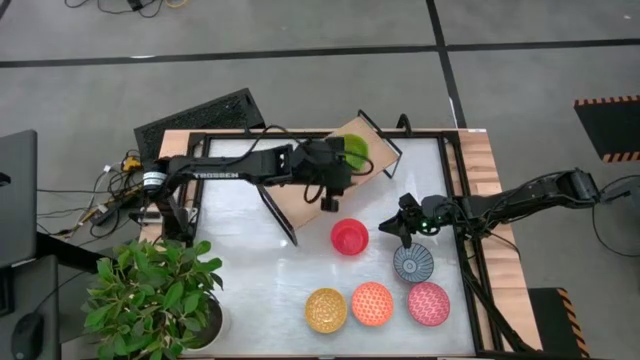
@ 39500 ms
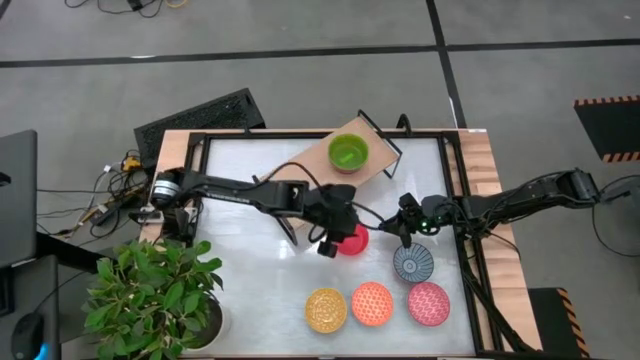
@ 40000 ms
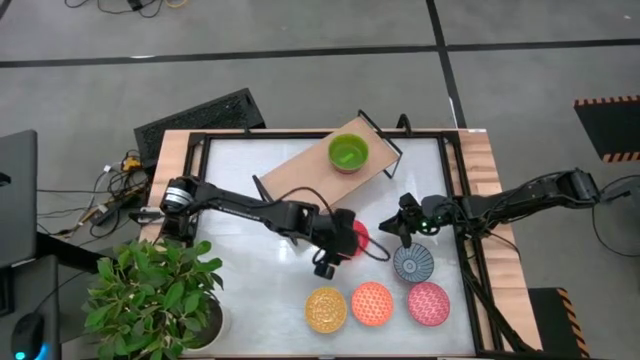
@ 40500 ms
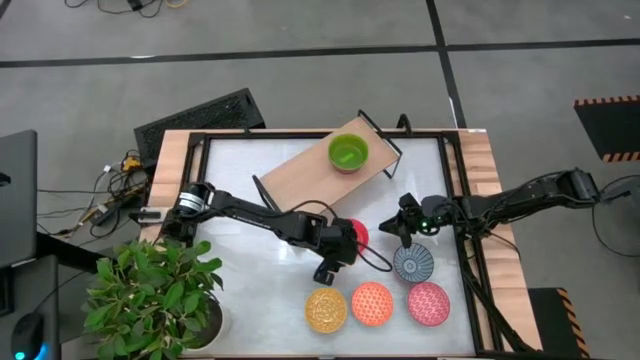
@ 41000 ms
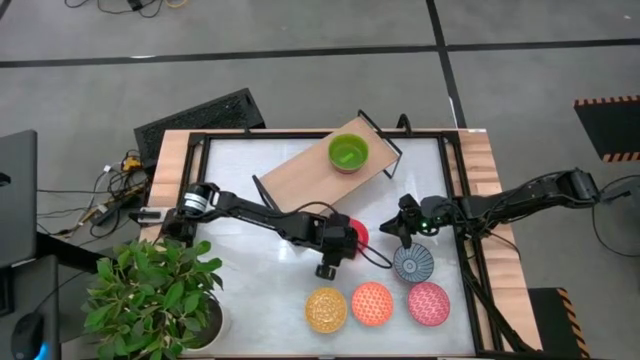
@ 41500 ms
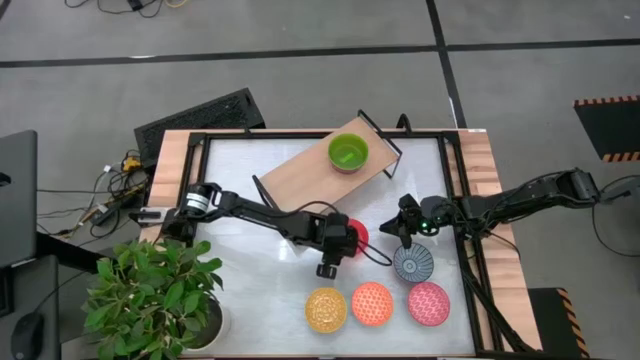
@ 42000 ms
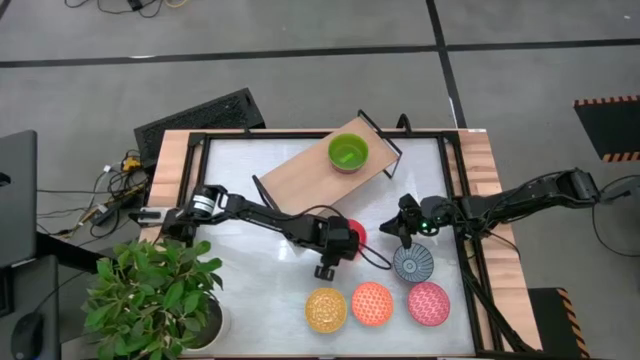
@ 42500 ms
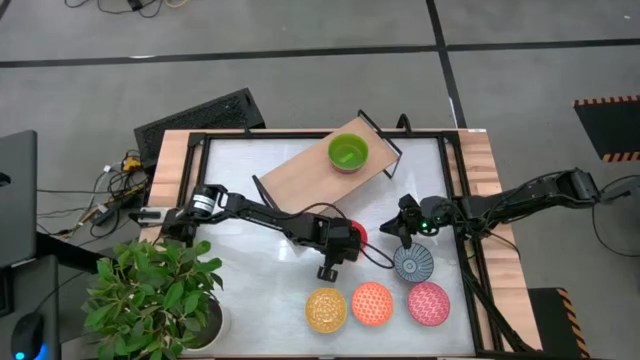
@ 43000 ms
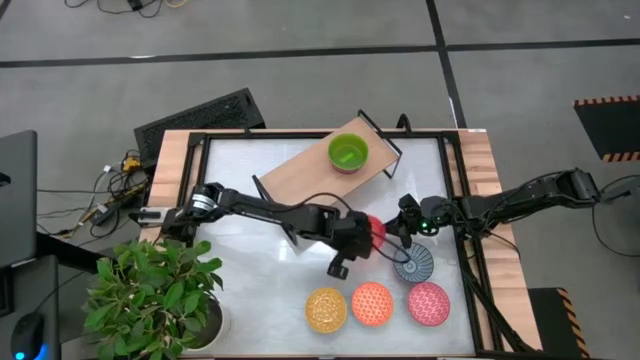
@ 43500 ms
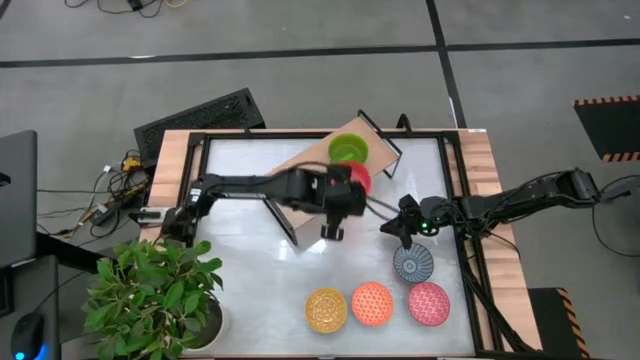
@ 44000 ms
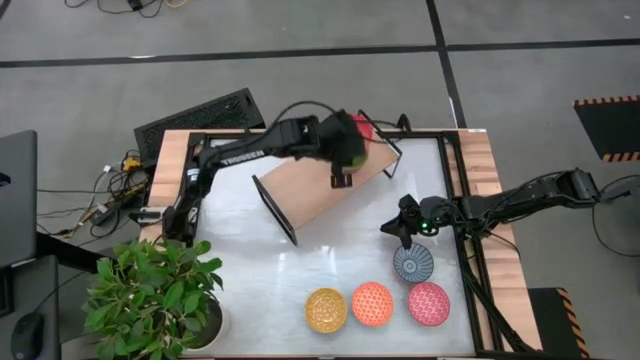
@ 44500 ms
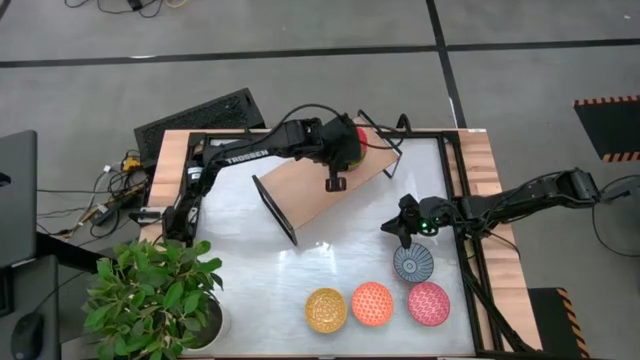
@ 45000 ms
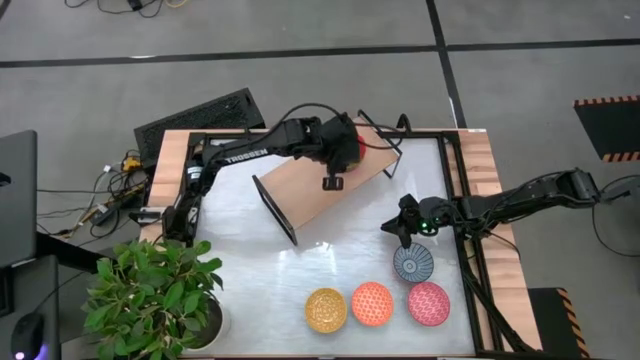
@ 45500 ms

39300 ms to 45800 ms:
Task: Place and stack bowls onto a shelf
Stack the orange bowl on top of the green bowl on the shelf

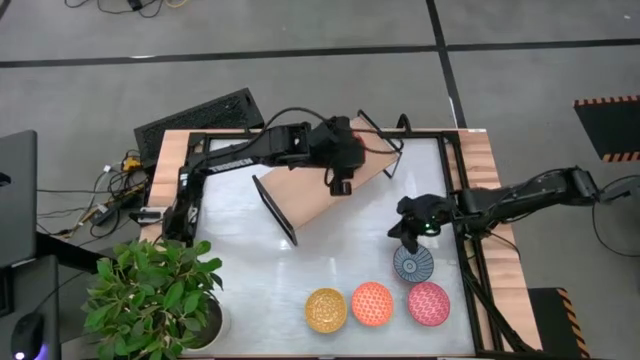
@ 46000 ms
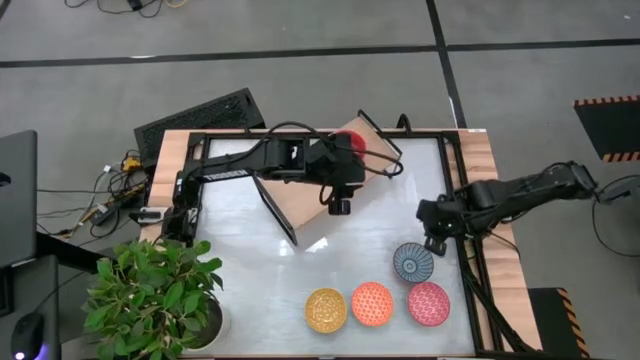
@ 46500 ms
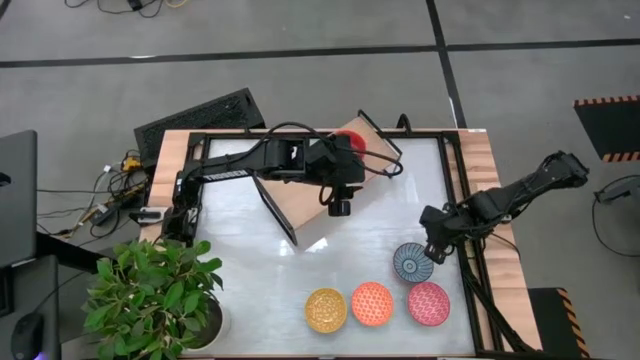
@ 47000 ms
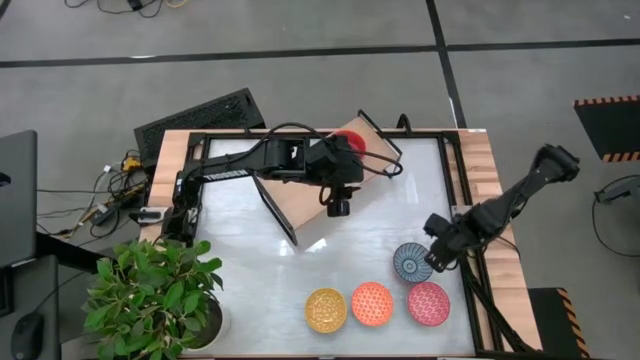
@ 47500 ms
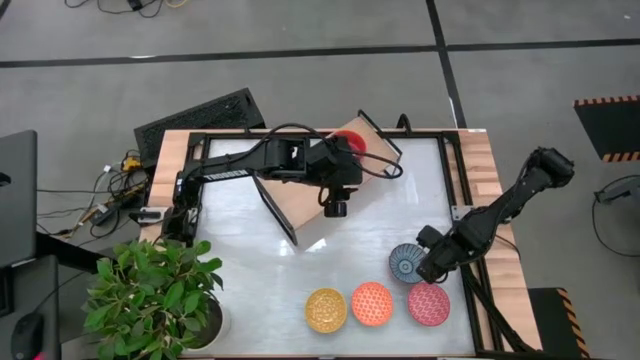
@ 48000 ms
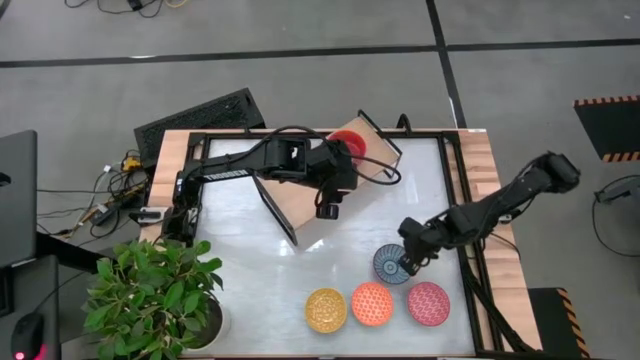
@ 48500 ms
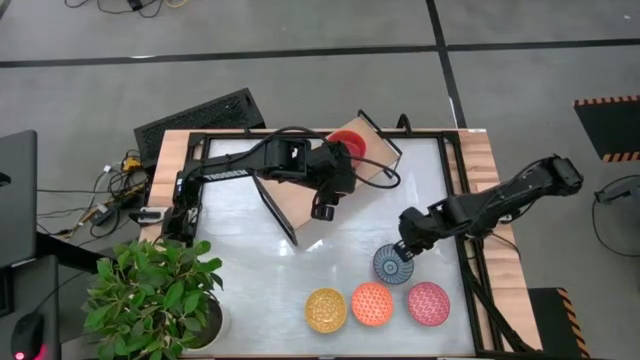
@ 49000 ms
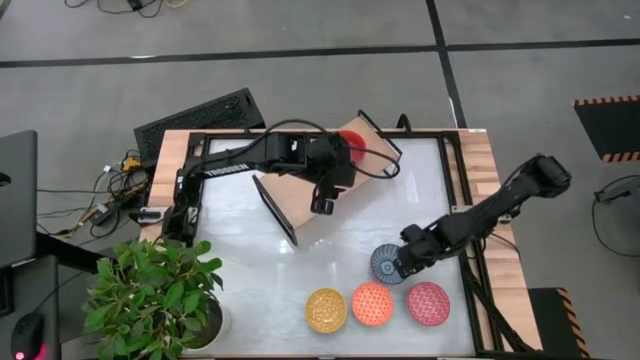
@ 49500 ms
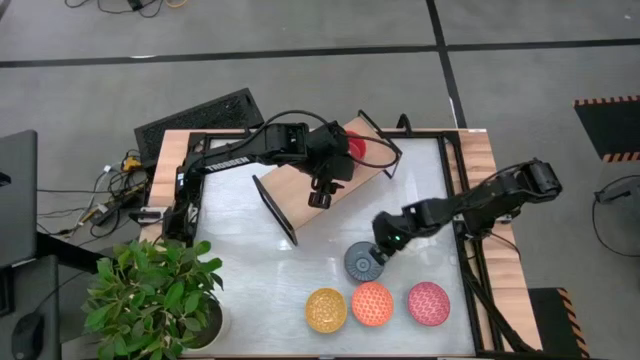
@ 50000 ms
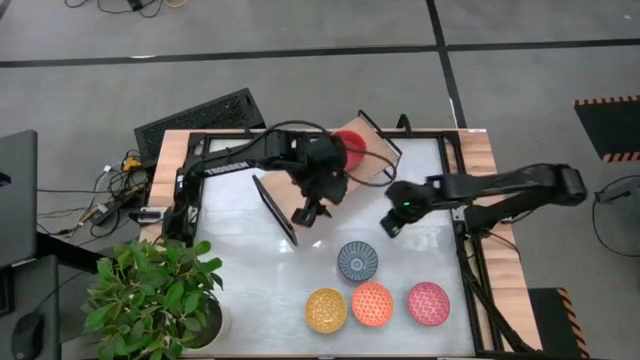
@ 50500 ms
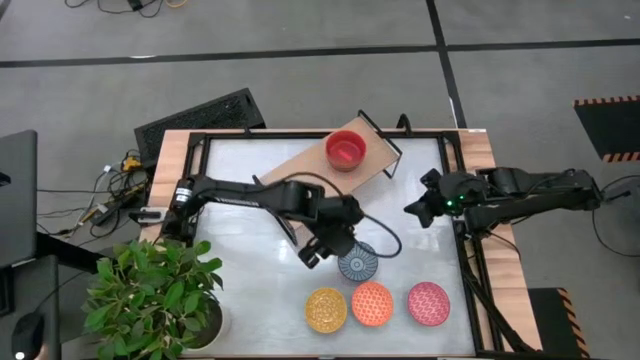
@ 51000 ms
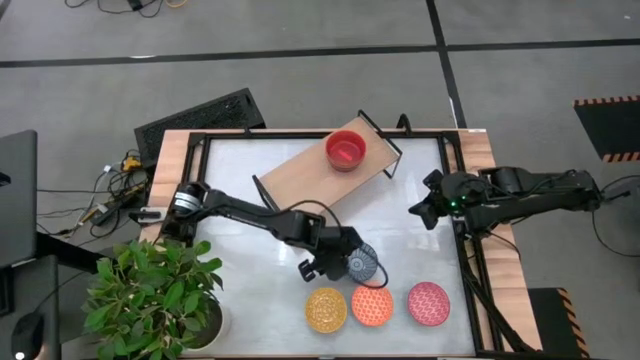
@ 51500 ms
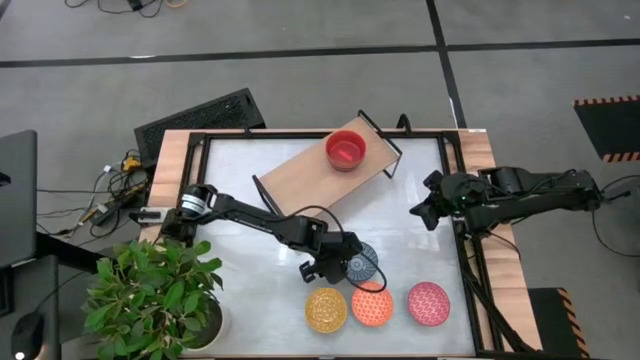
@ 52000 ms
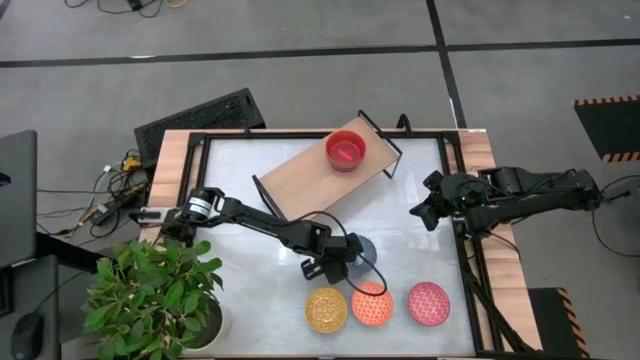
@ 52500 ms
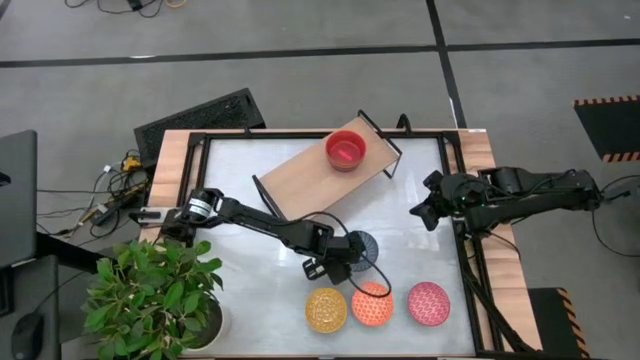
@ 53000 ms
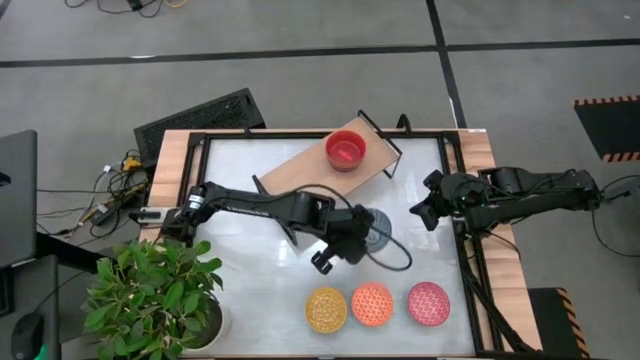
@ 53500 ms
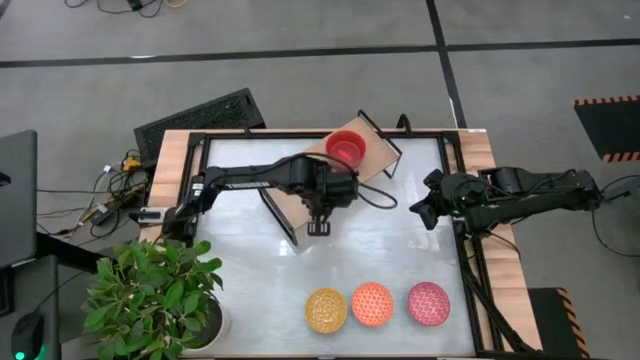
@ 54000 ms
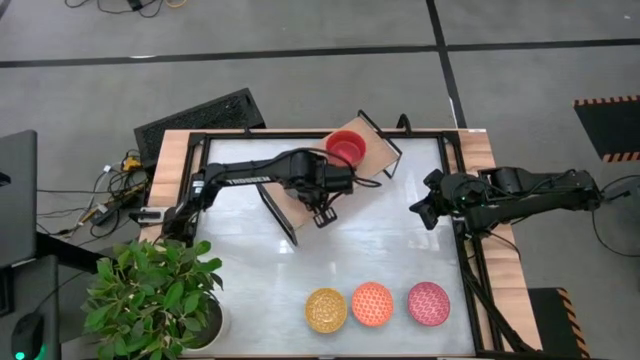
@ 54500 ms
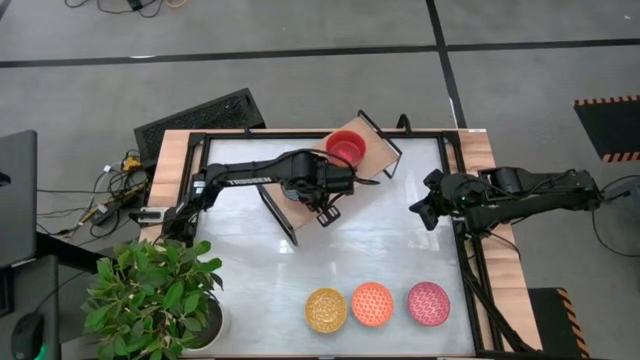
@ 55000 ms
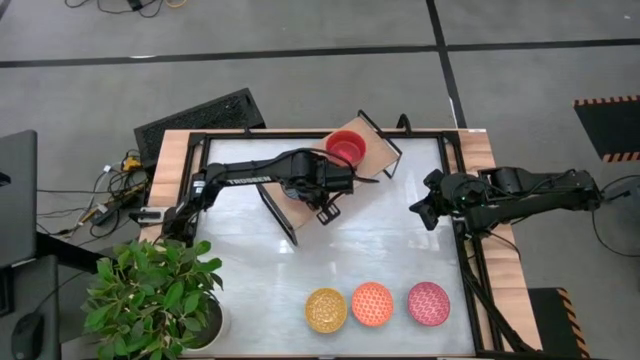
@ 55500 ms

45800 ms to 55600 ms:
Put the patterned blue bowl on the shelf

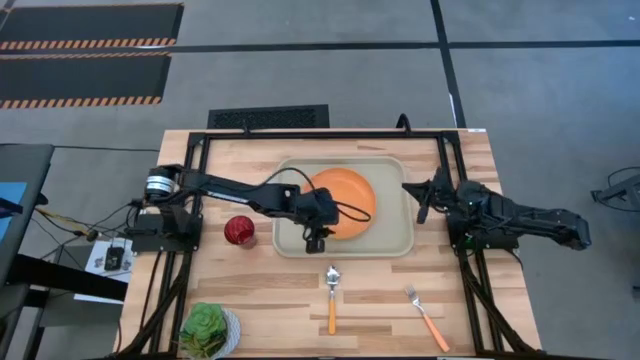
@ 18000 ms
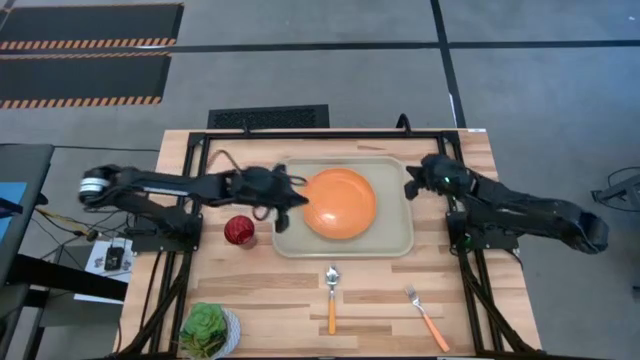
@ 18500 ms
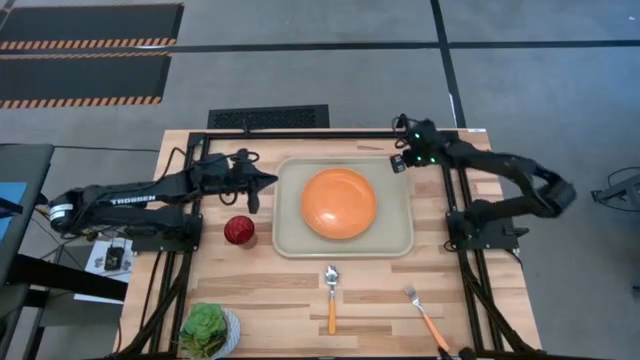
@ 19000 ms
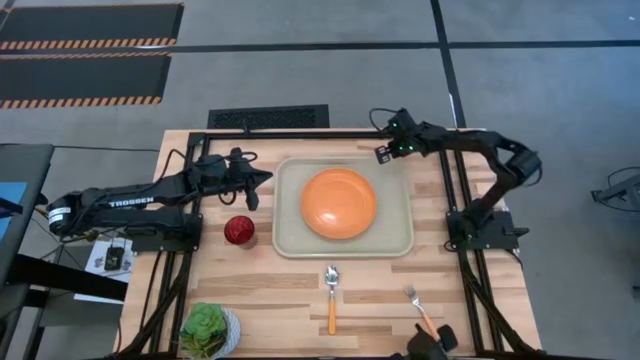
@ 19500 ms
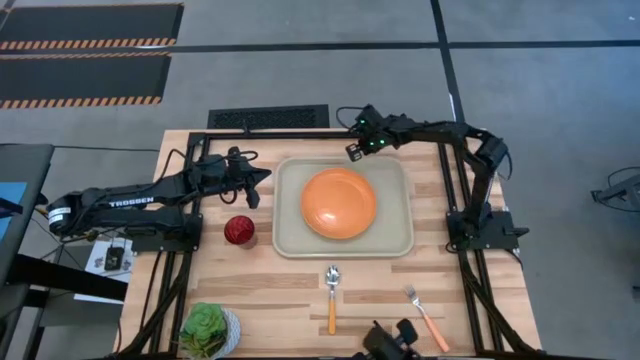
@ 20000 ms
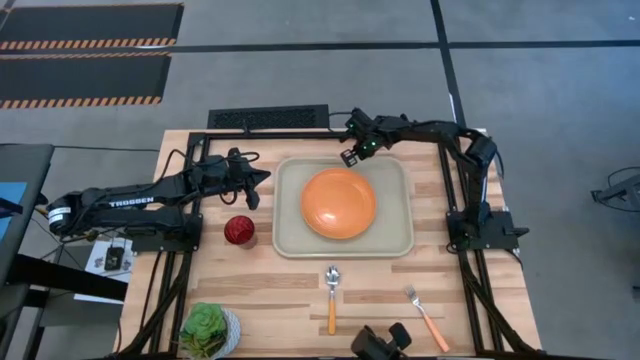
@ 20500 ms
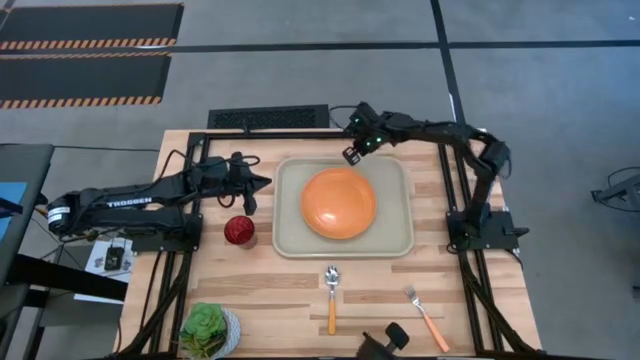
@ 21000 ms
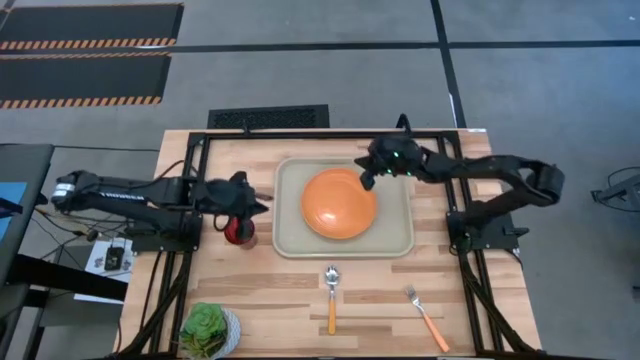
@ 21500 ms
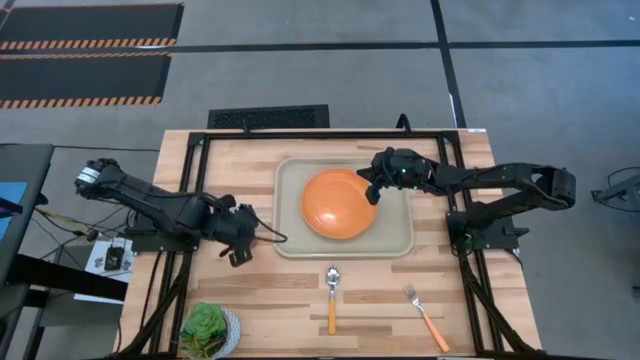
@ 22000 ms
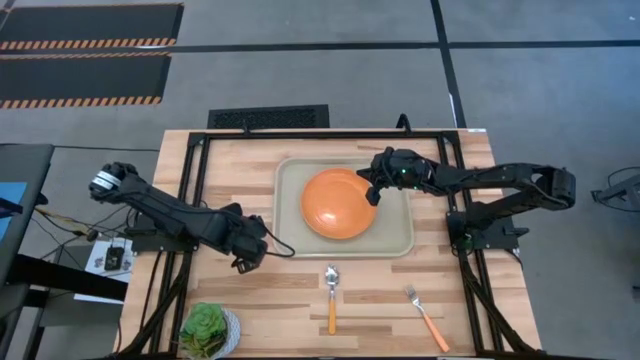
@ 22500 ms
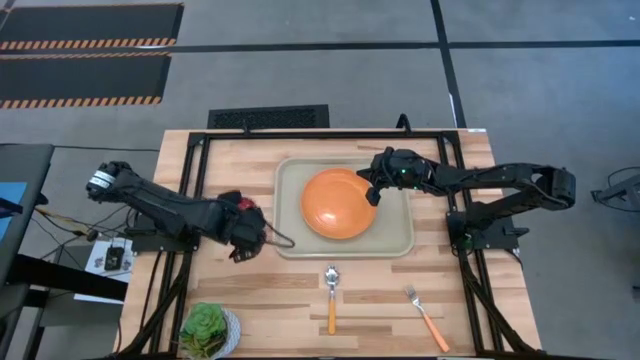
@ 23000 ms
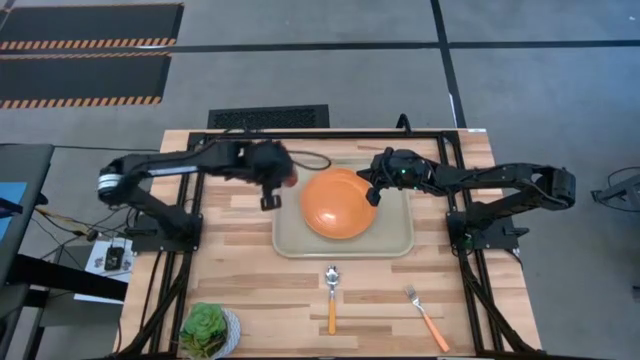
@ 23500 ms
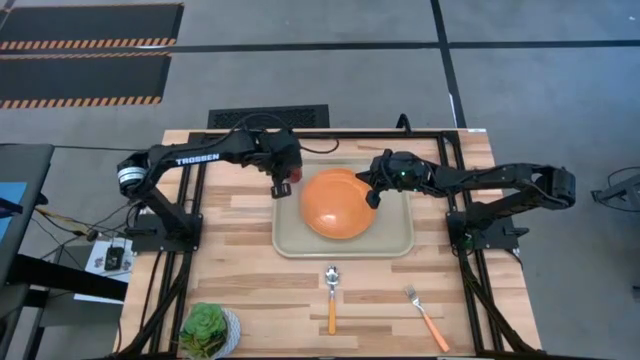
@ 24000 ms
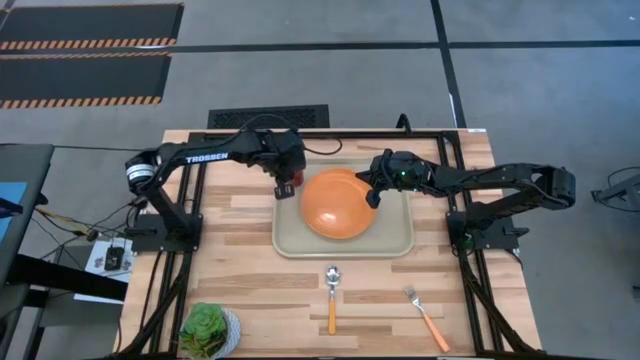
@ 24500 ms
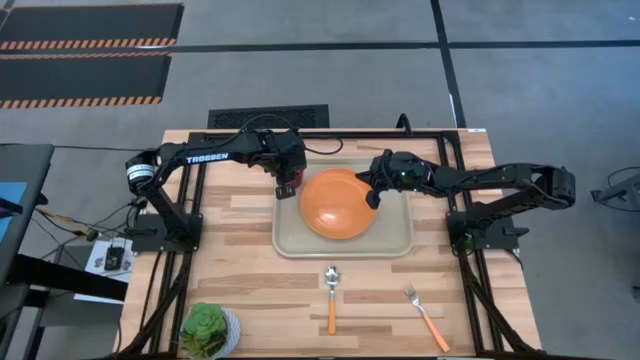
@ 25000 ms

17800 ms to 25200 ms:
Task: Pick and place plate/cup/fork/spoon on tray
Put the red cup to the top left of the orange plate on the gray serving tray
